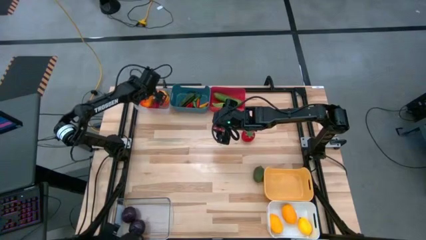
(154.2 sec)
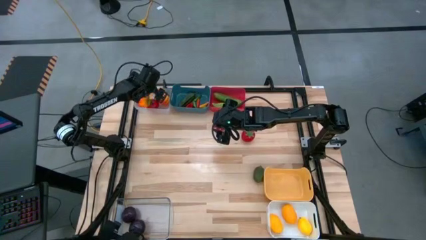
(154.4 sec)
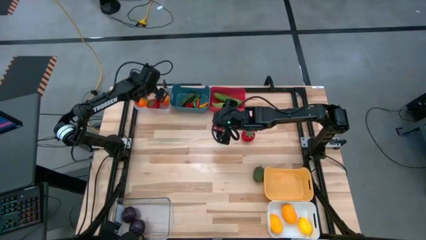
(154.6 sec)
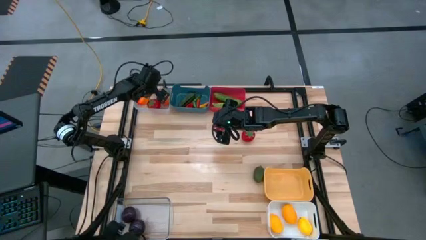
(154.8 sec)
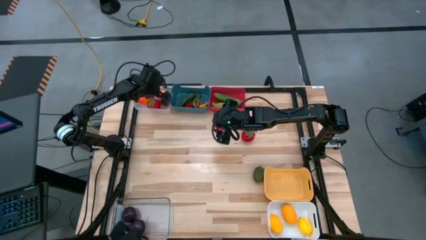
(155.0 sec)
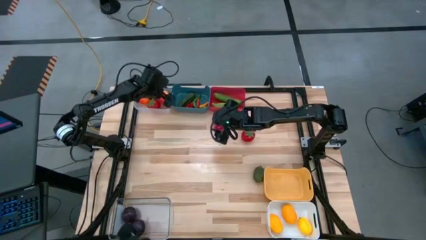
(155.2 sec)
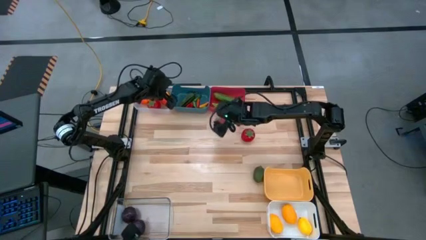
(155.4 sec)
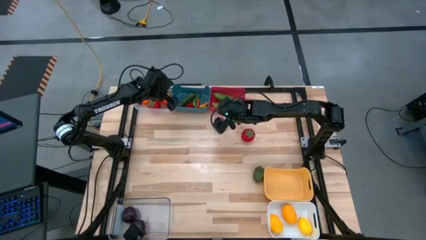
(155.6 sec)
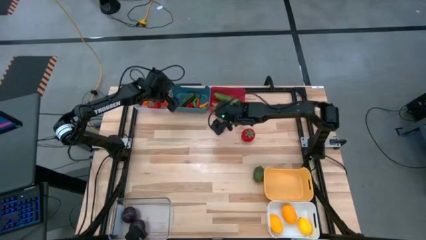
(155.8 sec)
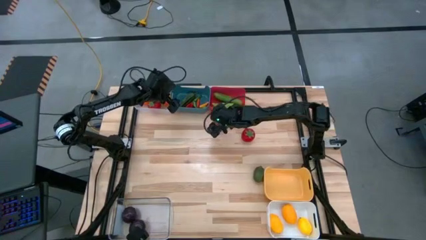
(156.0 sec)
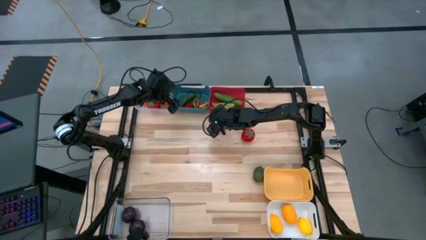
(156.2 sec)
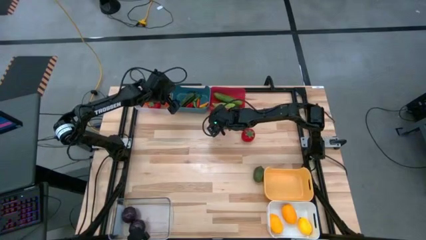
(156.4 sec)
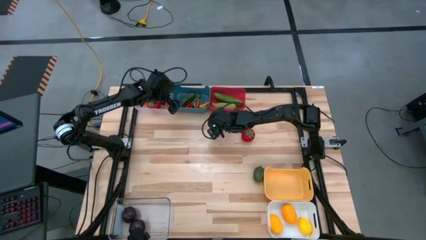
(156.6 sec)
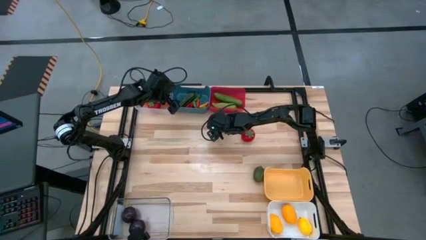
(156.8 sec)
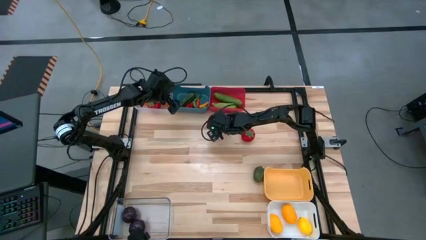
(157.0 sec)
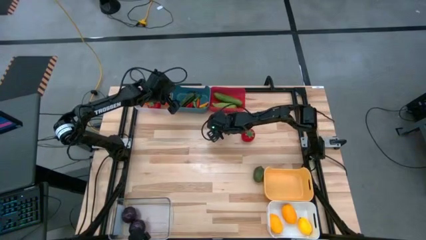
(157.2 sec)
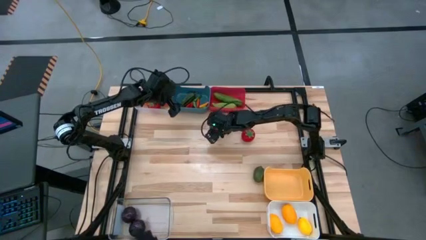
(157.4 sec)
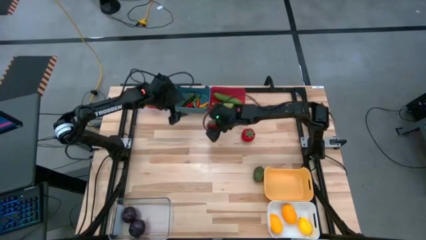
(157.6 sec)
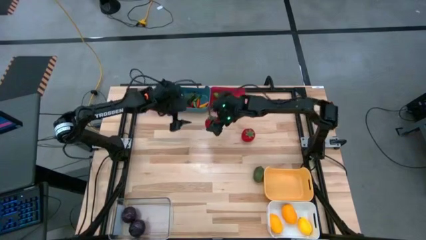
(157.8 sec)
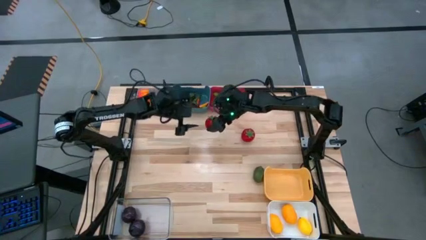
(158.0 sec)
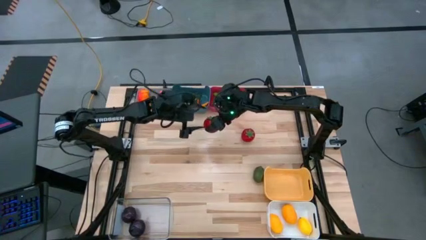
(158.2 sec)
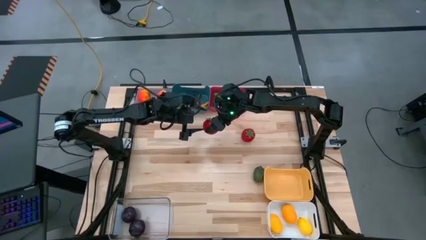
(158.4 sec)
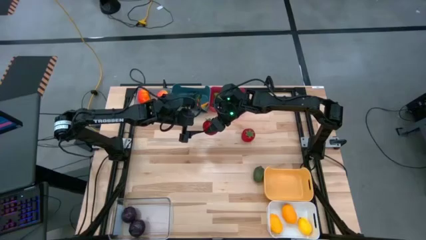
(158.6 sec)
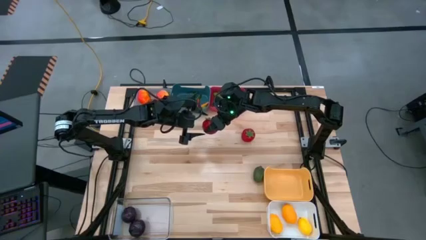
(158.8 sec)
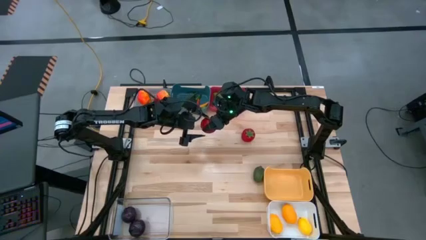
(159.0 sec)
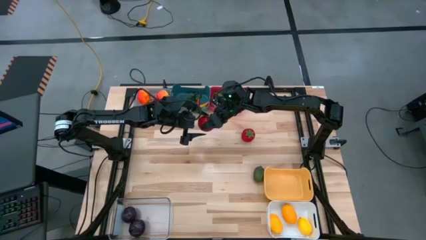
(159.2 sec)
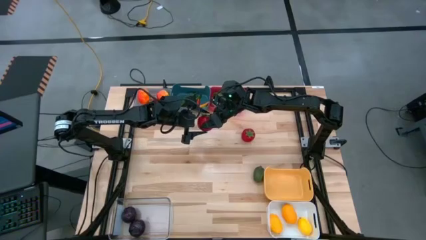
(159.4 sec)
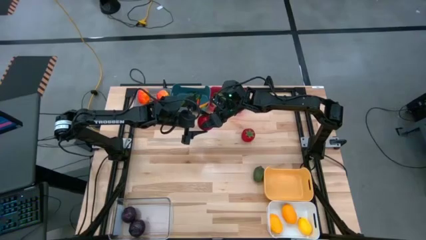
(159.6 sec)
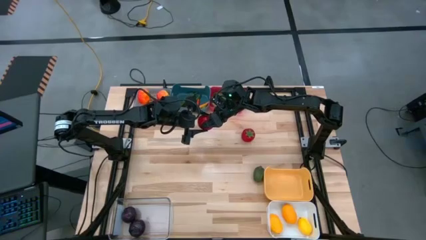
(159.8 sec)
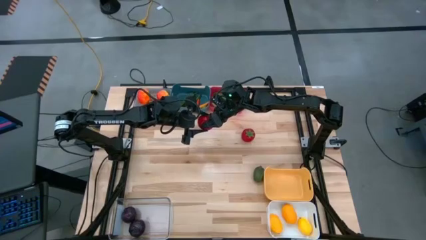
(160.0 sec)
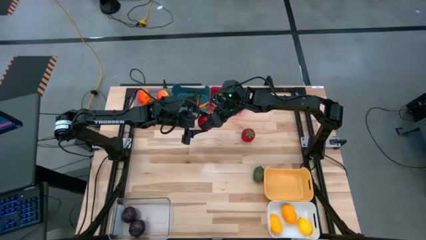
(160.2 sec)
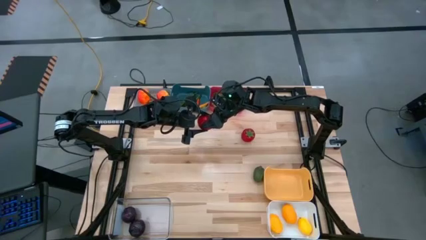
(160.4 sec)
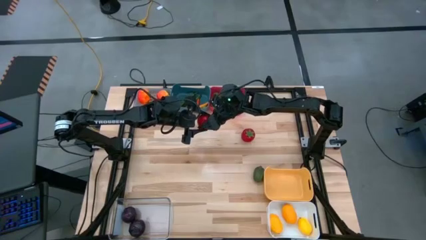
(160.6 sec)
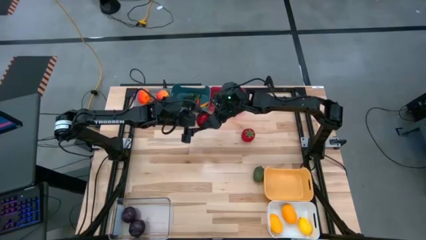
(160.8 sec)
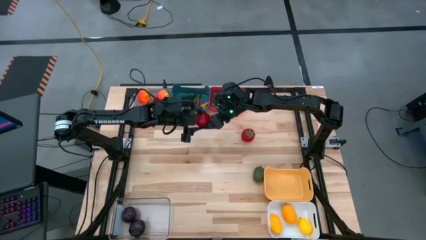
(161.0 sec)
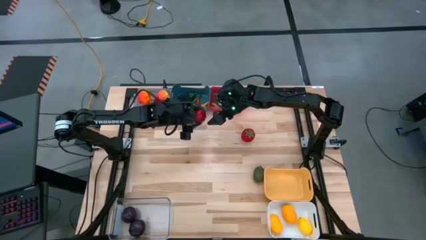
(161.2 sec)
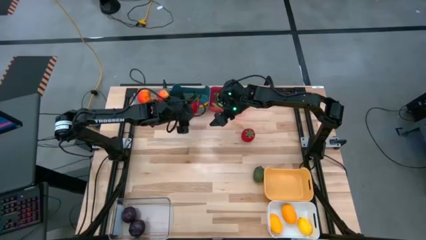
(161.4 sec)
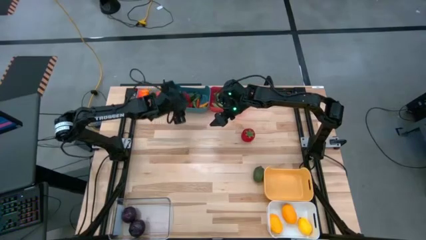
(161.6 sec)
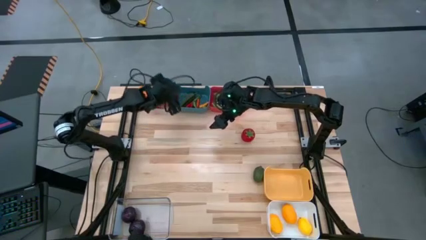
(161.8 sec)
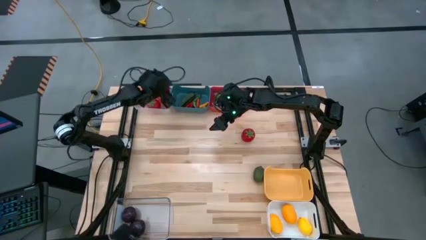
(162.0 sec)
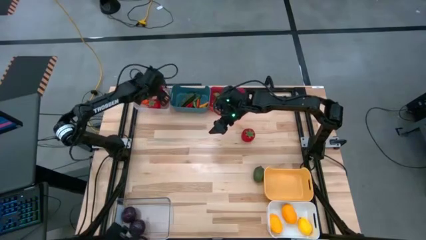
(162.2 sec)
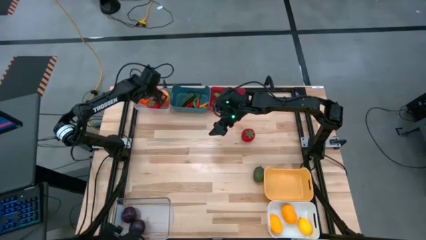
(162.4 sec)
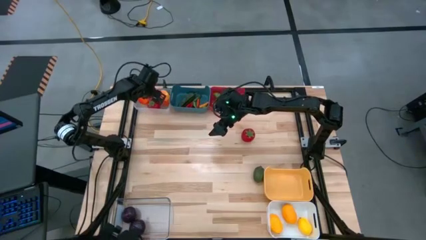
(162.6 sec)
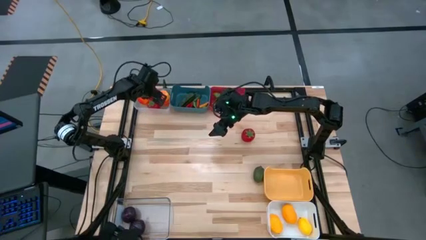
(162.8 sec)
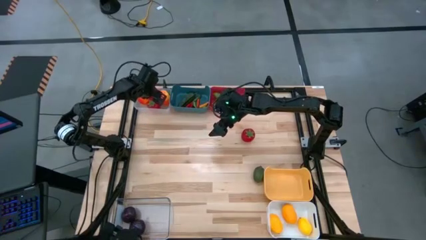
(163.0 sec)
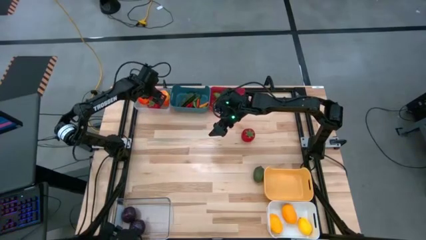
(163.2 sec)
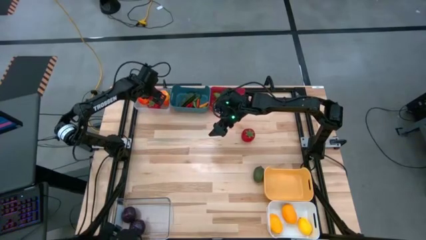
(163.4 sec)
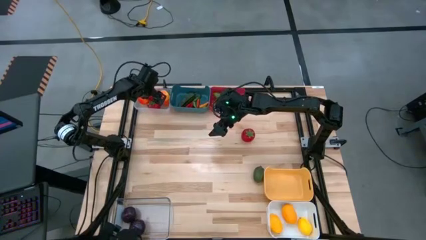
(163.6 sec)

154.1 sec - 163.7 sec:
Task: Sort produce into baskets
Put the red tomato into the top transparent bin

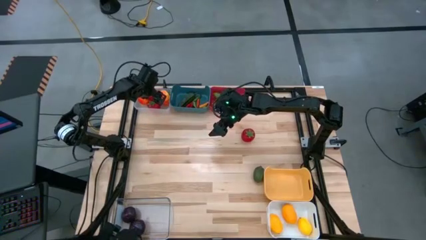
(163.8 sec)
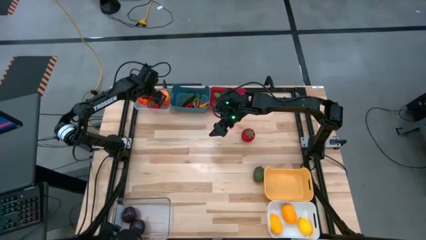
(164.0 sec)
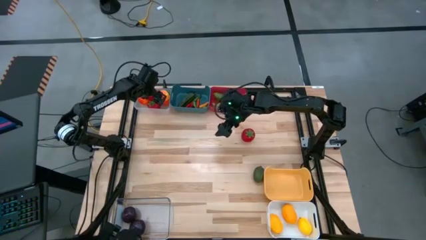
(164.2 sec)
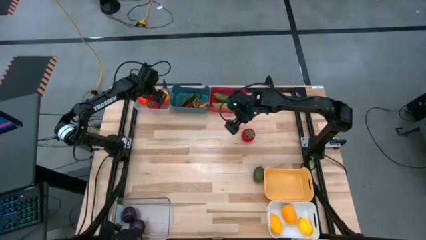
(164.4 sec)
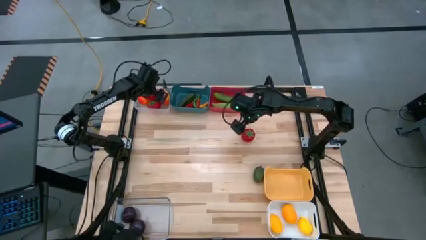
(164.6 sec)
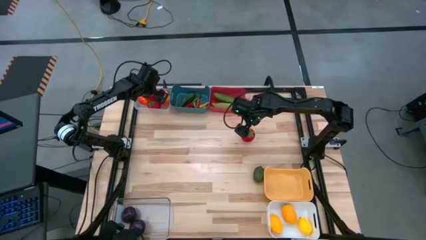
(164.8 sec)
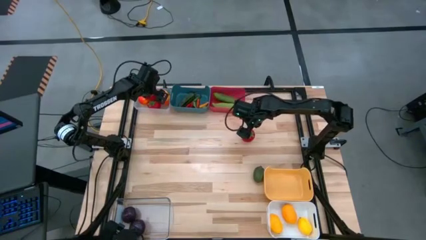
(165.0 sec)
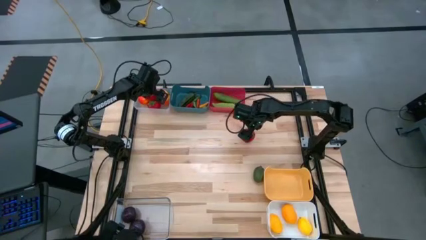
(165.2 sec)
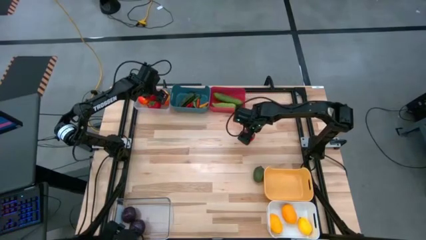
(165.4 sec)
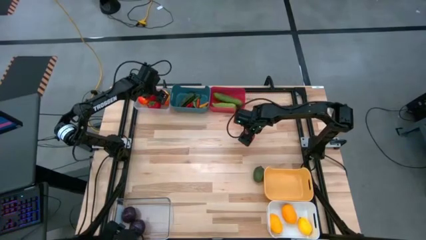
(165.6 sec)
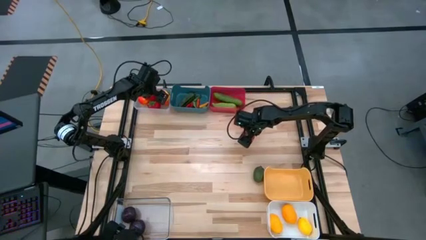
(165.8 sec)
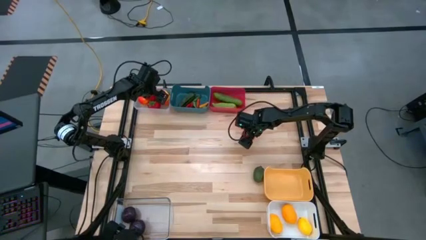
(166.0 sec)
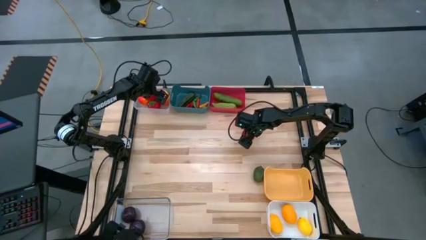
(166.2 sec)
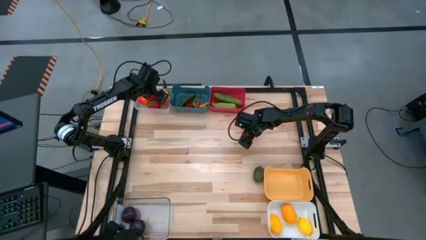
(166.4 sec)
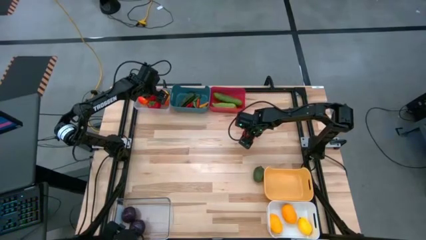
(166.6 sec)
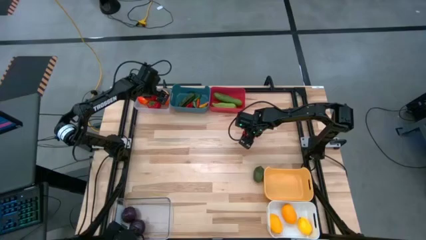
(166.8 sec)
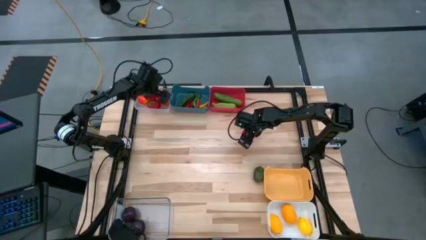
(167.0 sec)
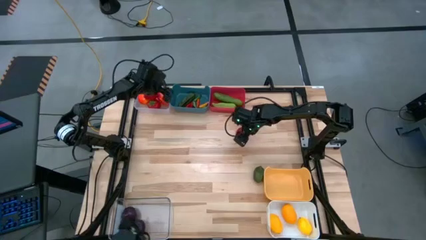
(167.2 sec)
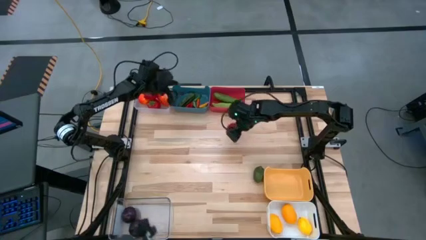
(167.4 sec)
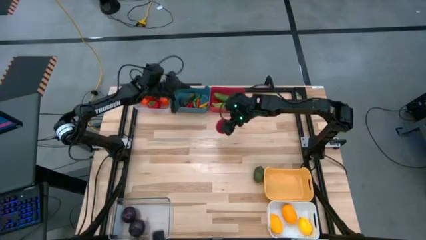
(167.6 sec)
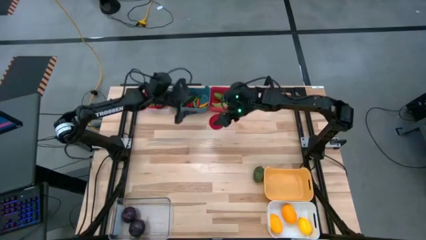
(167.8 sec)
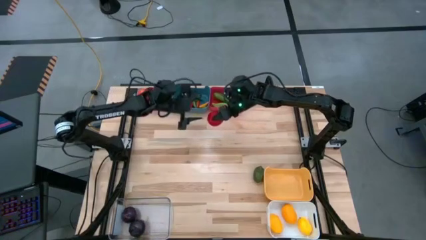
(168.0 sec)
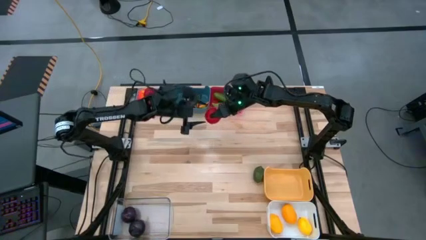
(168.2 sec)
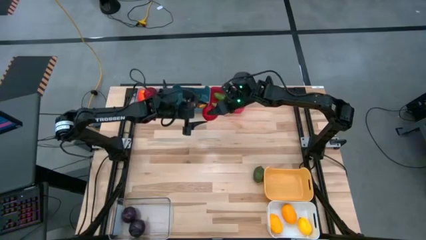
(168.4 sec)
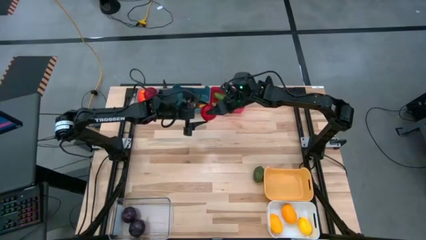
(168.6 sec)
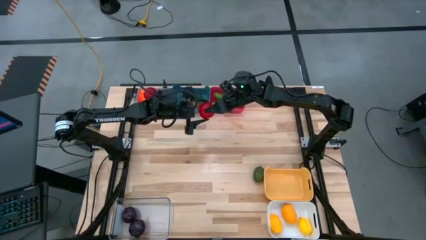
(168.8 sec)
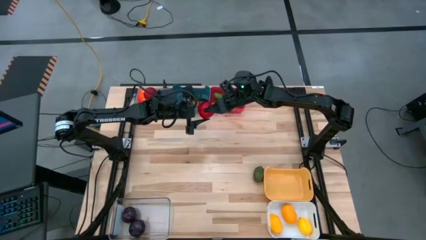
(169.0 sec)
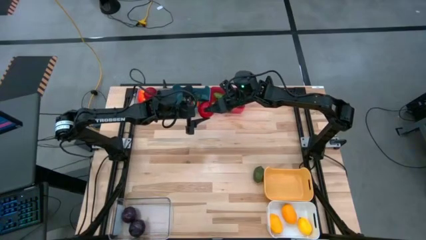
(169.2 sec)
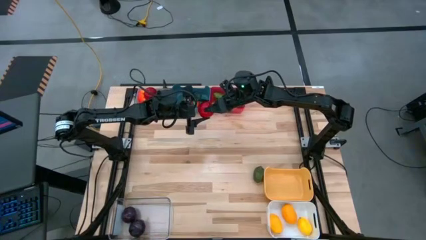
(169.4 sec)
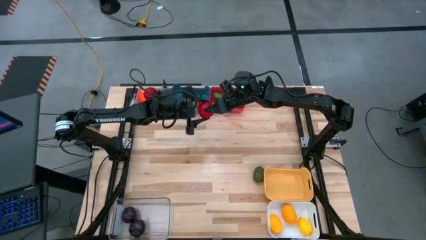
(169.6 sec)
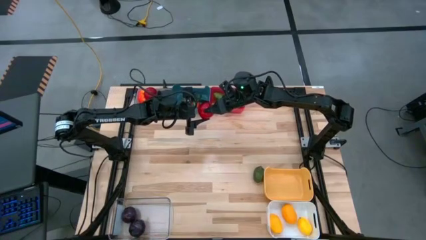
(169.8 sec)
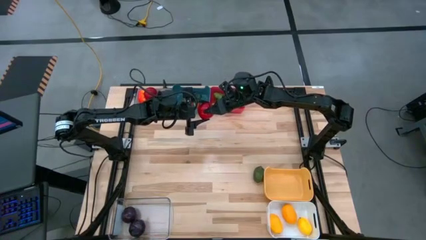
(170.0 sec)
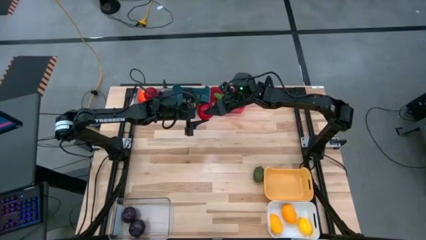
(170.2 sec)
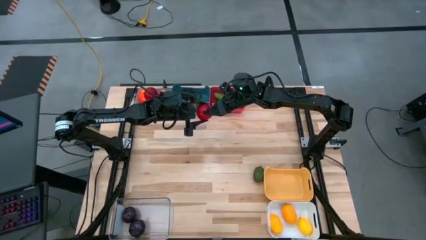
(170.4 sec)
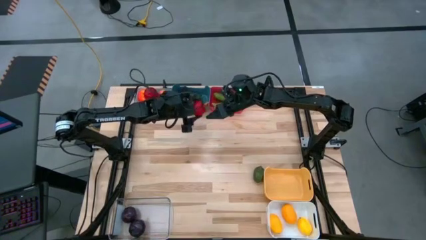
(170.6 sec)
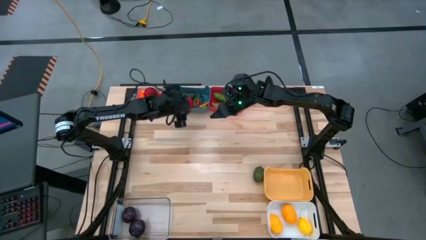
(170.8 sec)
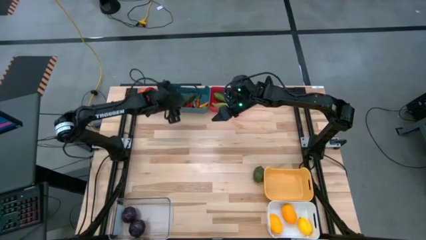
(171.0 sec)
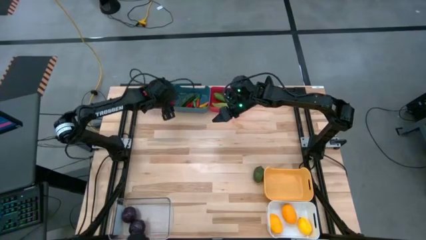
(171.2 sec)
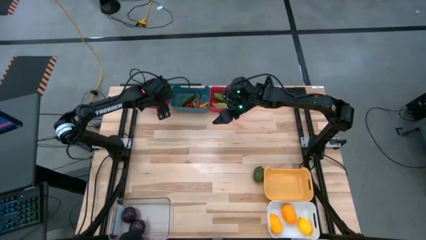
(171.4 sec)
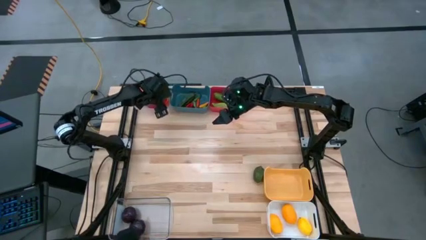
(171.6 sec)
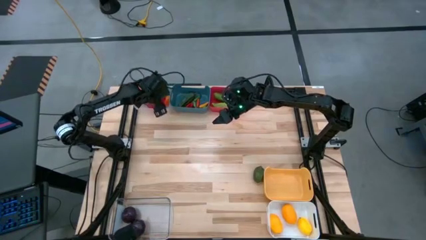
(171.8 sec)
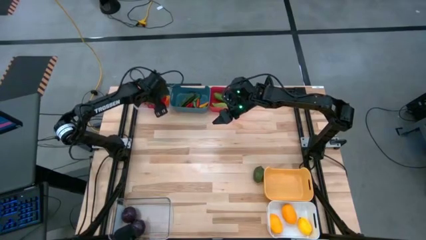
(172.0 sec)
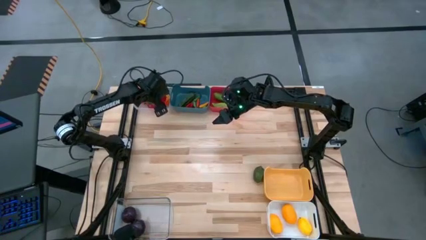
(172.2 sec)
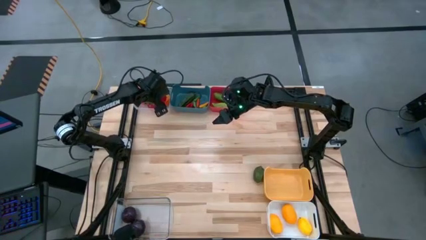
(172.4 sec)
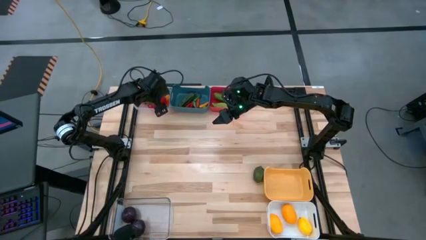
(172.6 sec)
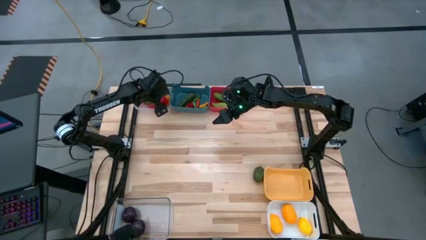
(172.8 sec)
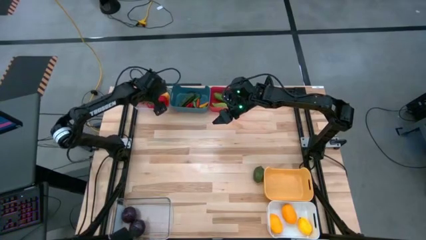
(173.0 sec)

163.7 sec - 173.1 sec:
Put the red tomato into the top transparent bin
